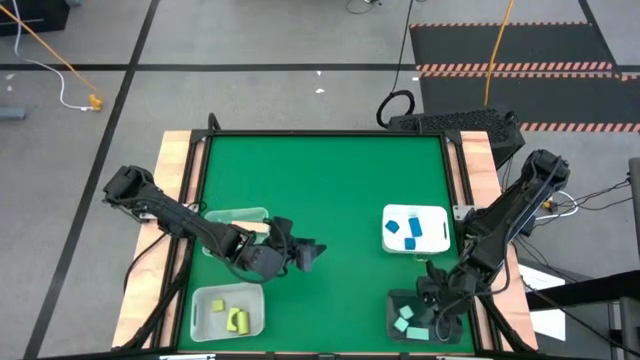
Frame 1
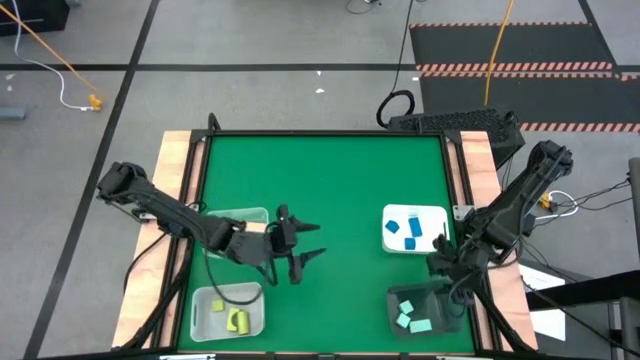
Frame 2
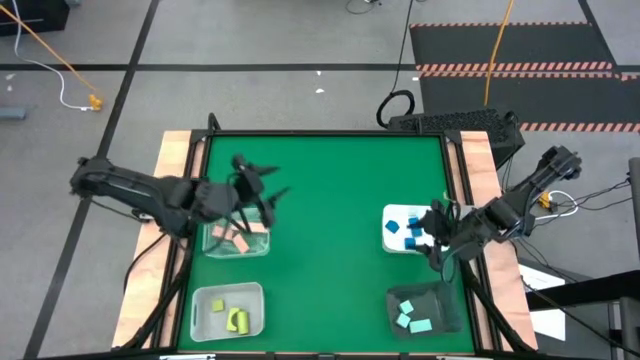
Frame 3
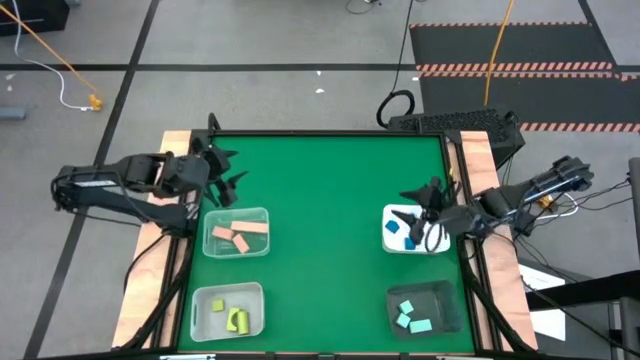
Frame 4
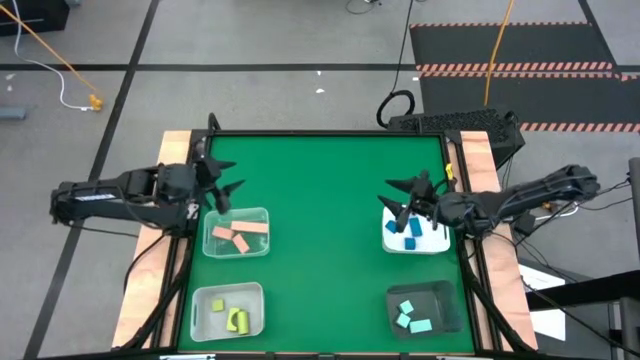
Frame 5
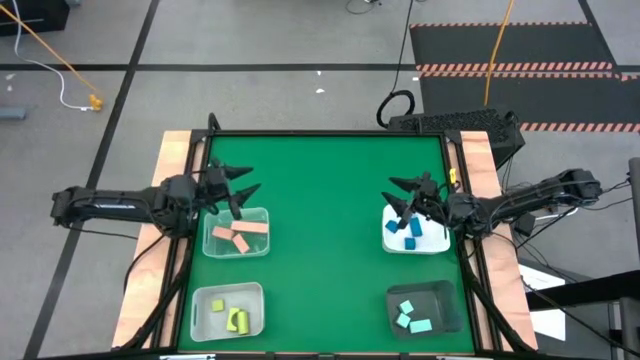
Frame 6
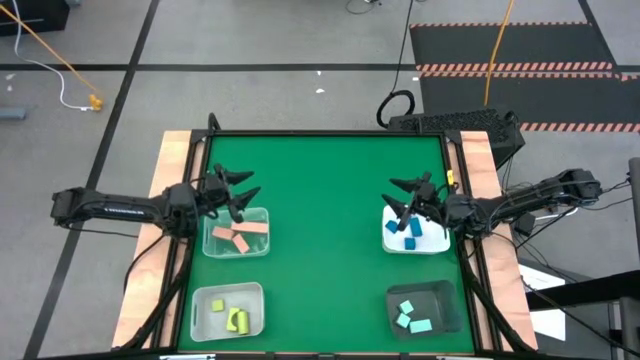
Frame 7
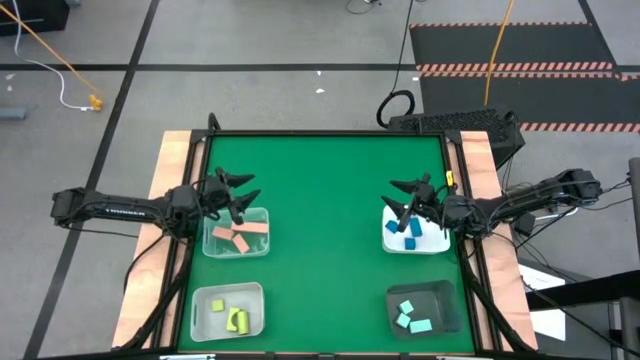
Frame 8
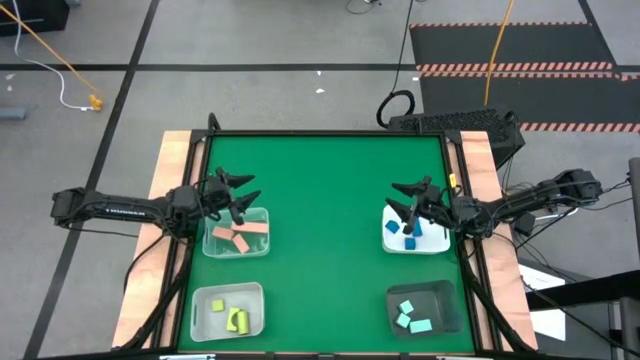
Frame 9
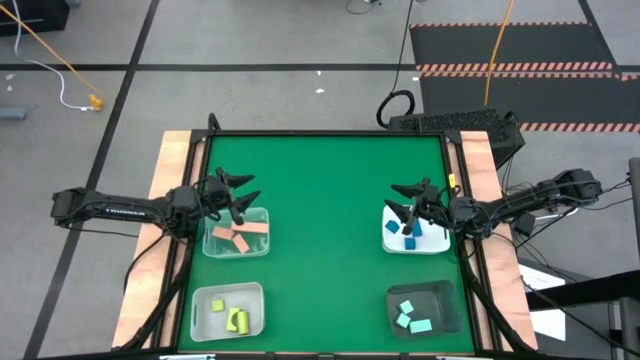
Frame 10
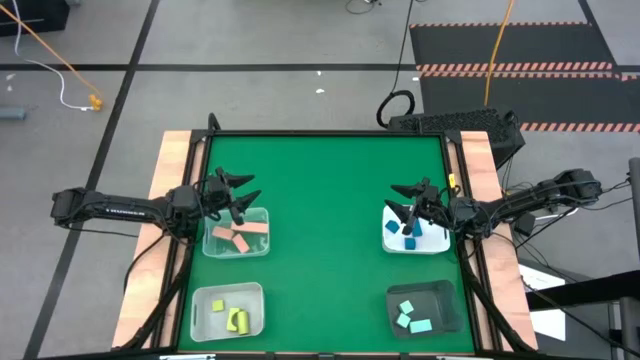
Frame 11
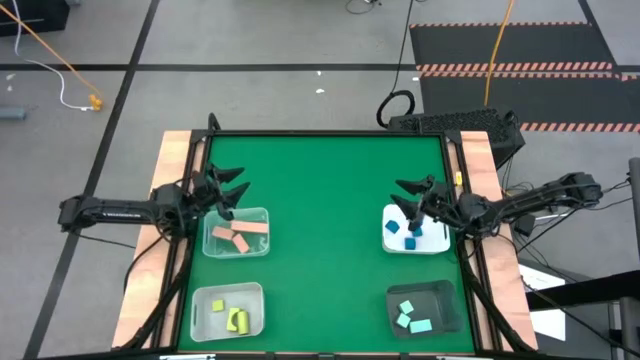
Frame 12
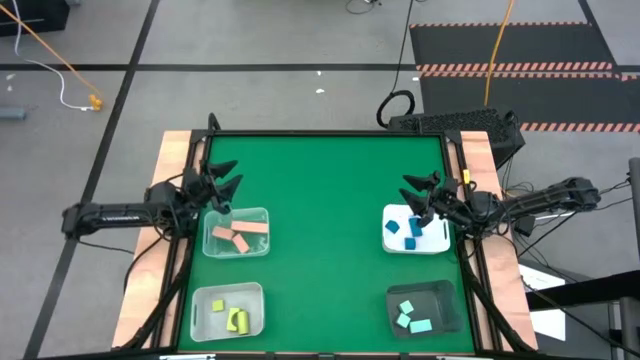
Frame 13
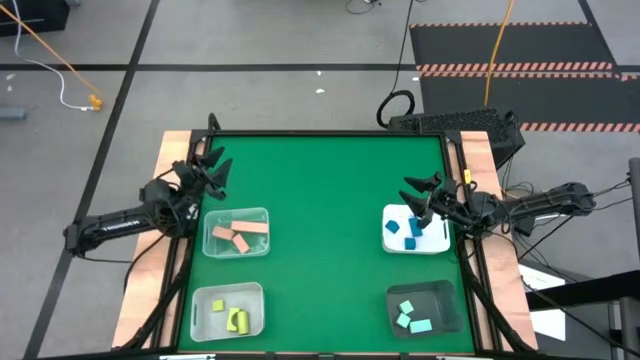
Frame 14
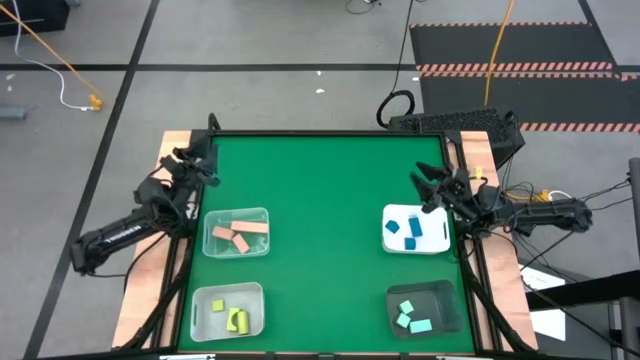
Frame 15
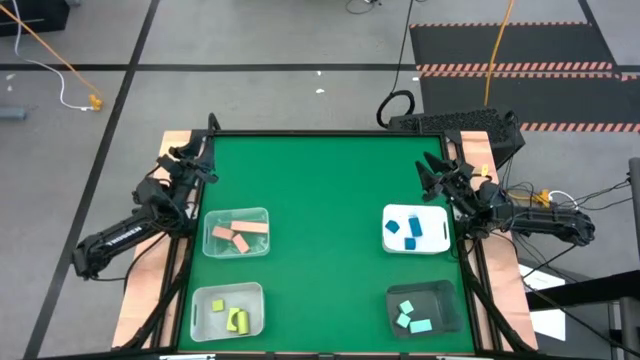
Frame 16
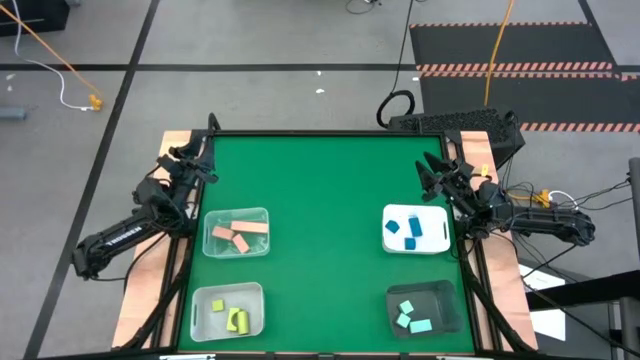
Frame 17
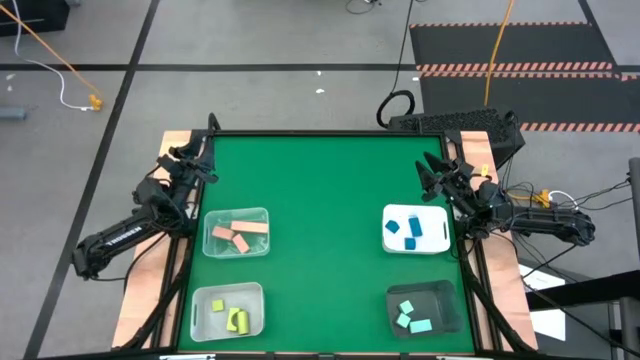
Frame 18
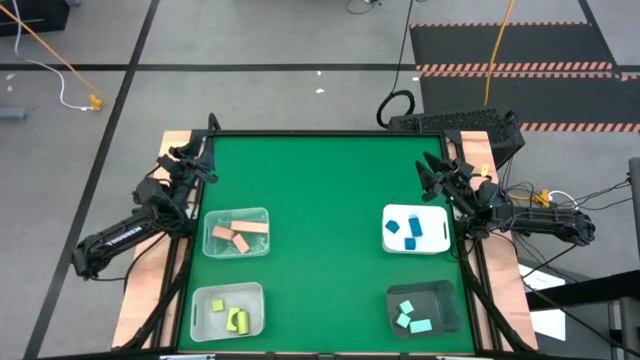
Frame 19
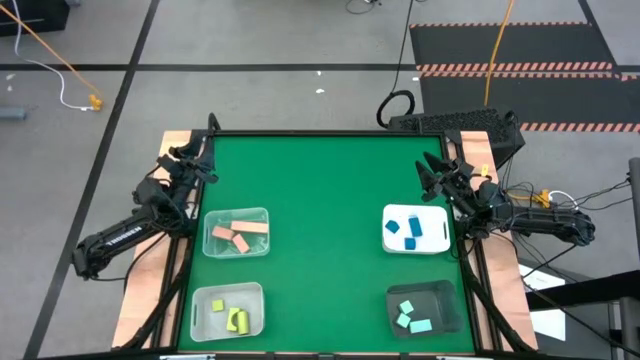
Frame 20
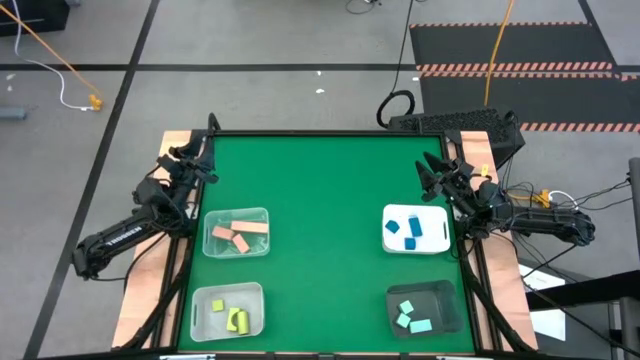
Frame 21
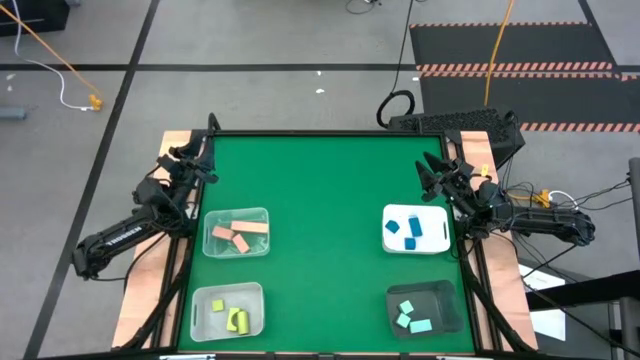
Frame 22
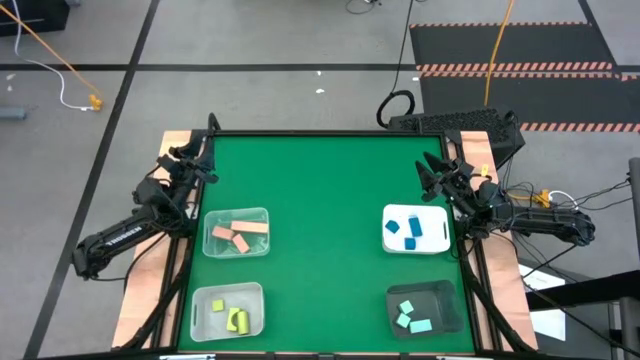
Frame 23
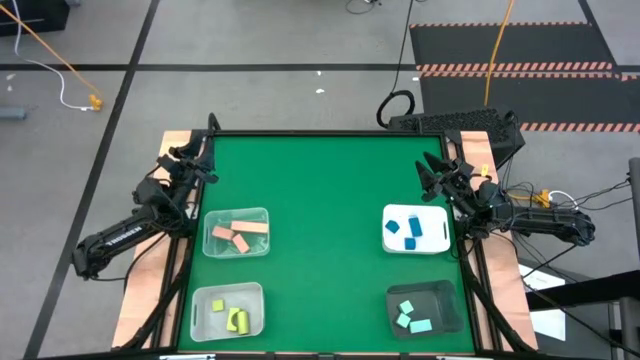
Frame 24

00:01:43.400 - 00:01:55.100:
Task: Sort & place blocks by color
Return to Home Position

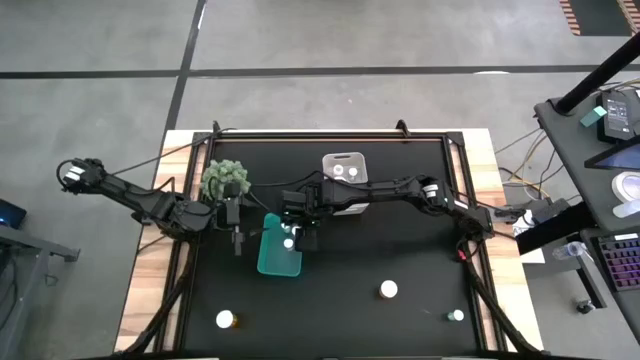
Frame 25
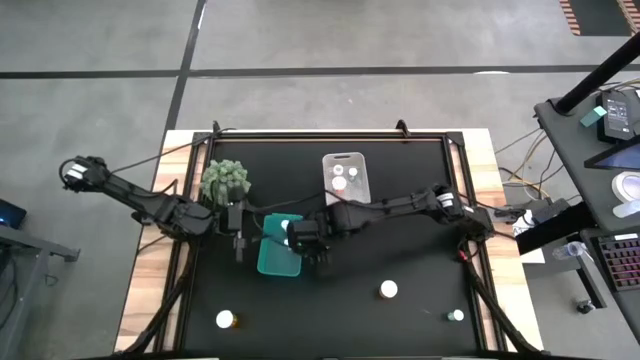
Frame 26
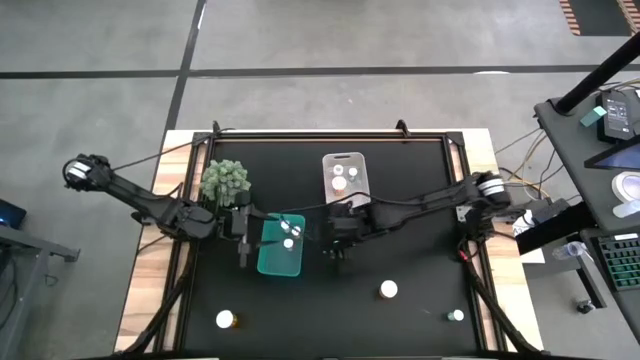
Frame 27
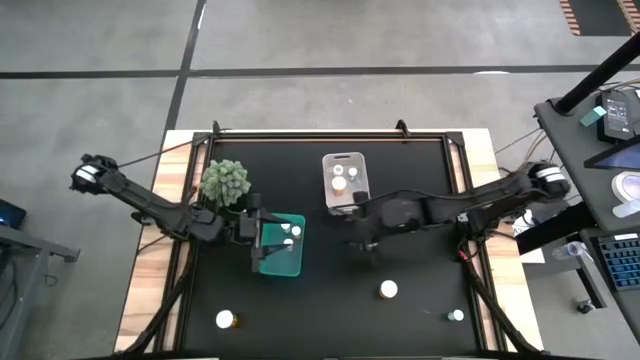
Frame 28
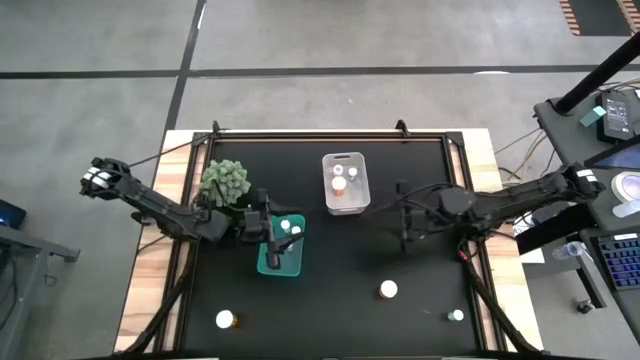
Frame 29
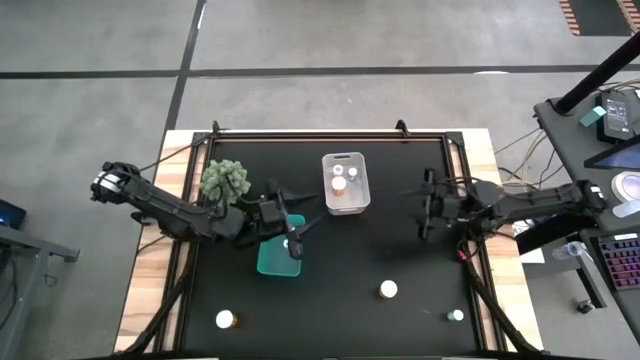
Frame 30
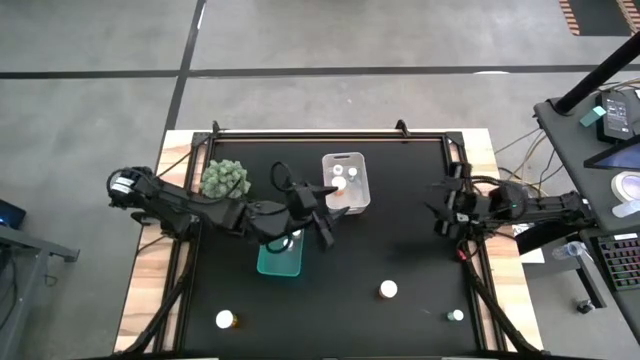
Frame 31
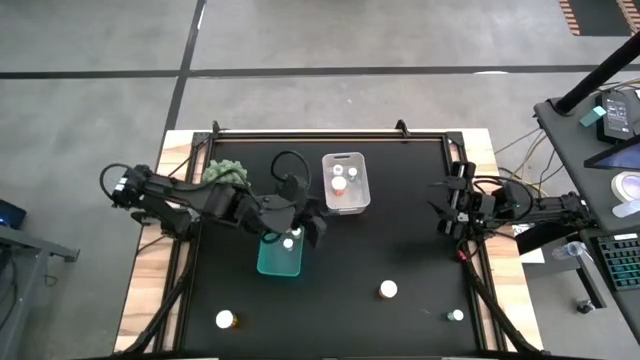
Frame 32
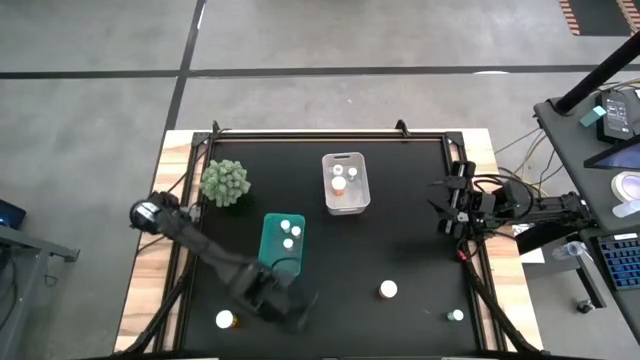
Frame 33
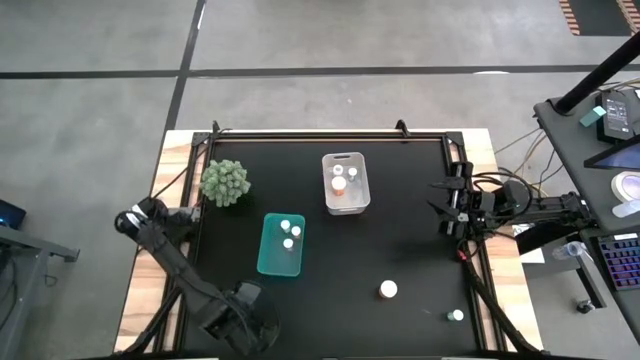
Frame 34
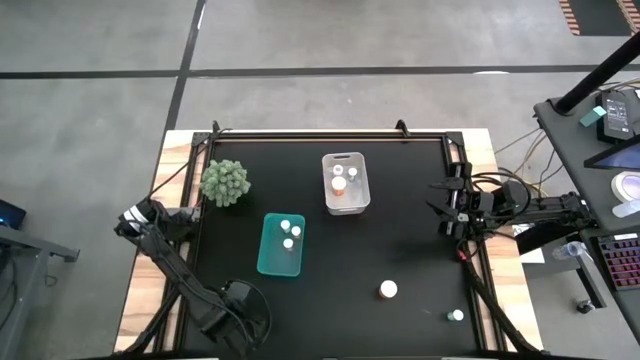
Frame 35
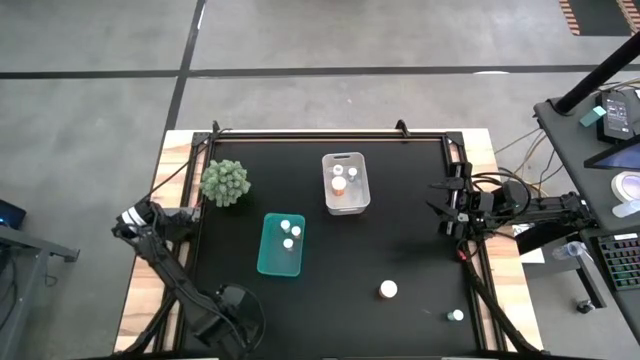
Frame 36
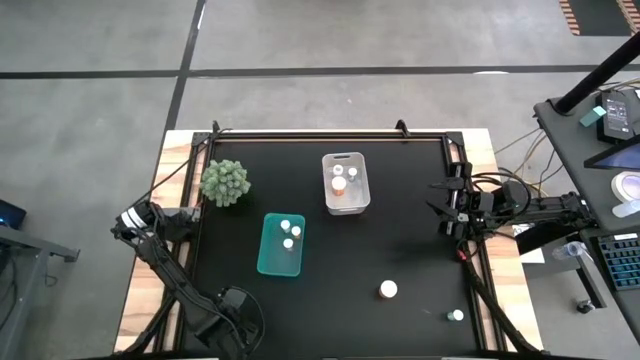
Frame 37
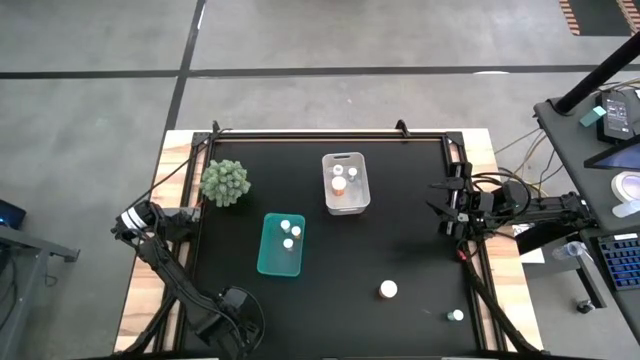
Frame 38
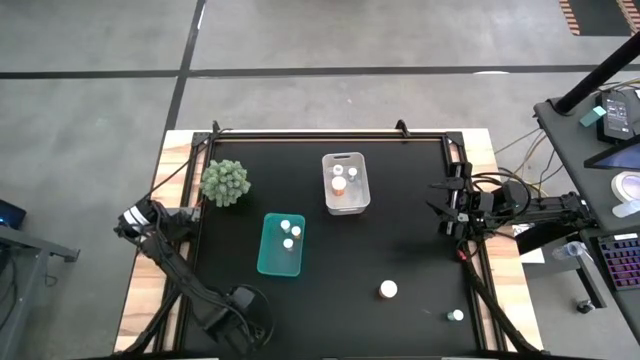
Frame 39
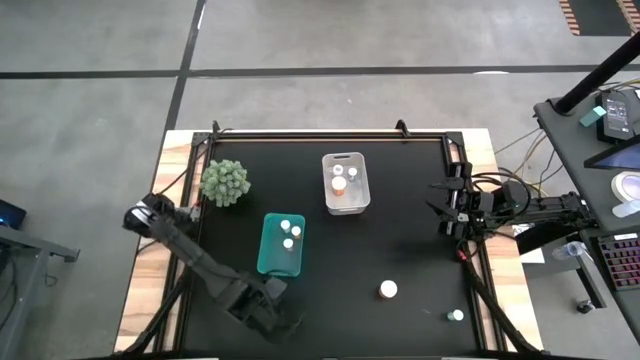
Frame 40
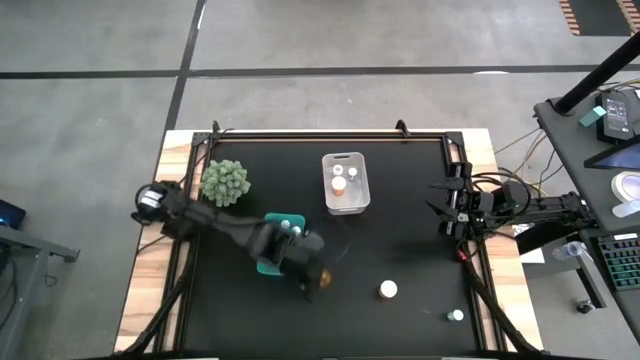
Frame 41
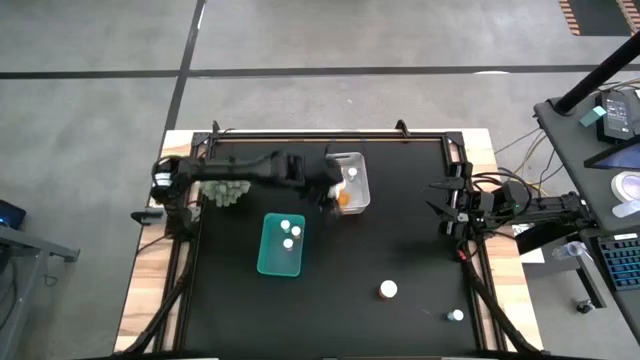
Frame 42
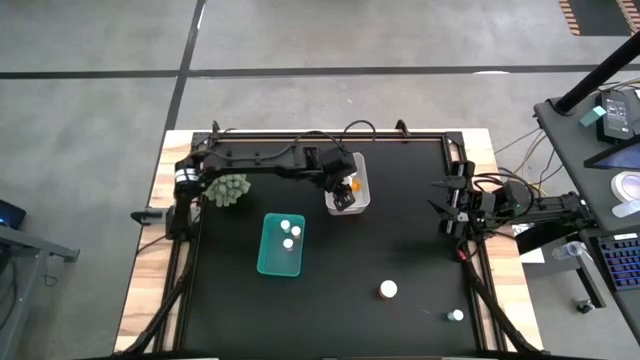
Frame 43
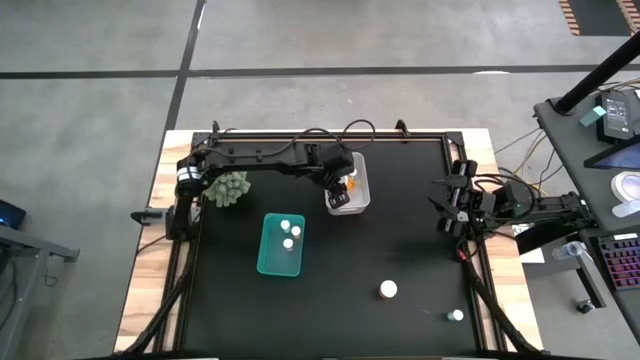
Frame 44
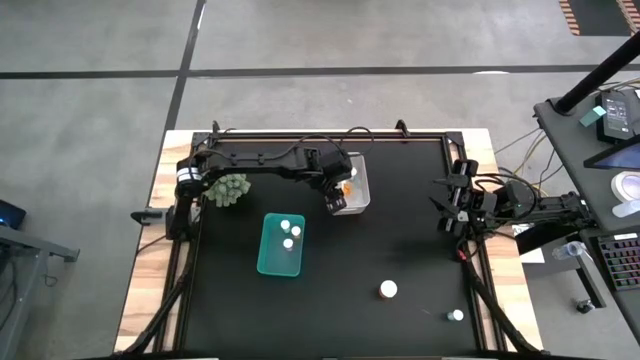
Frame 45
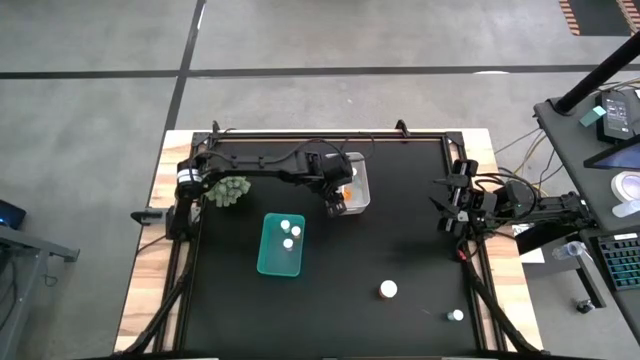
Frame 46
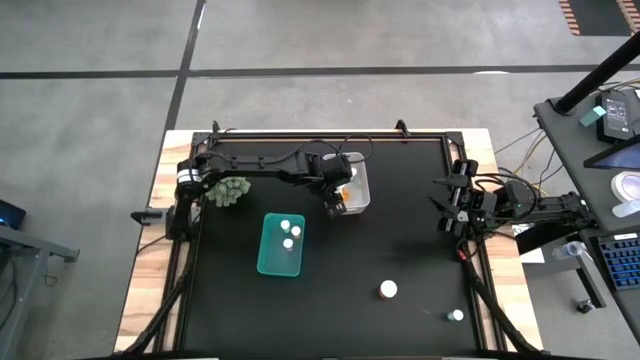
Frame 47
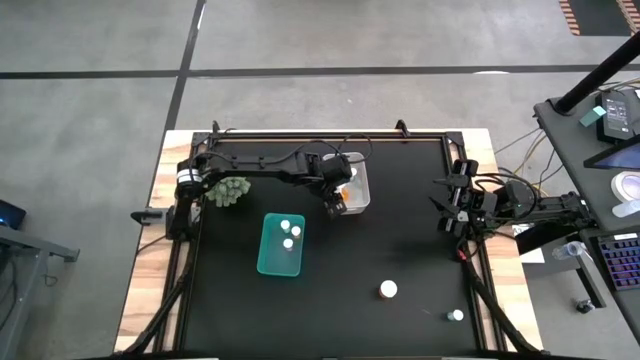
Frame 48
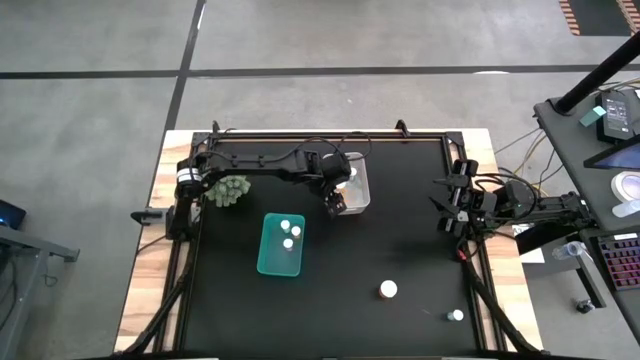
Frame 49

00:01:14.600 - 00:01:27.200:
Task: Pick and place medicine bottles into bin by pill shape (circle, oval)
Put the bottom left orange pill bottle into the white bin
